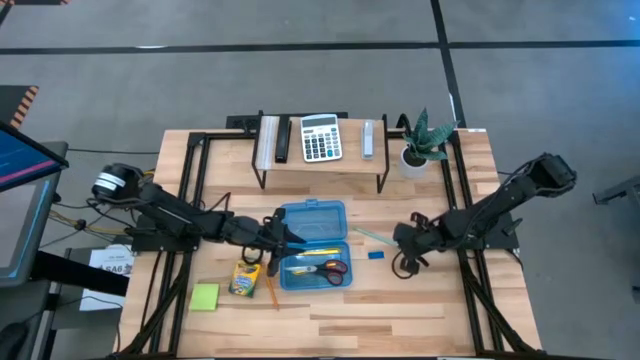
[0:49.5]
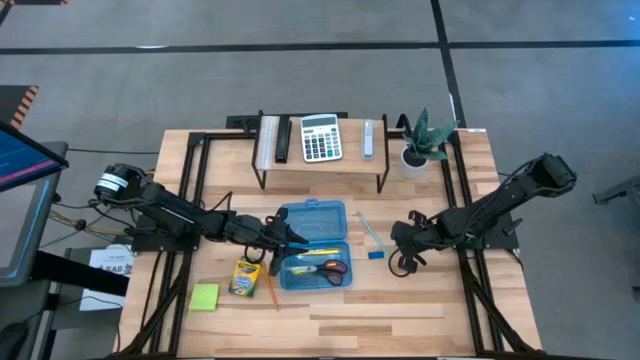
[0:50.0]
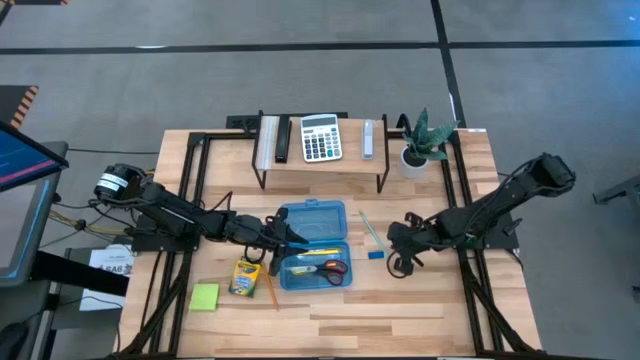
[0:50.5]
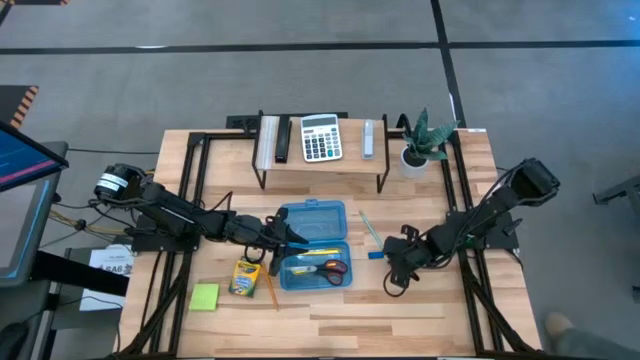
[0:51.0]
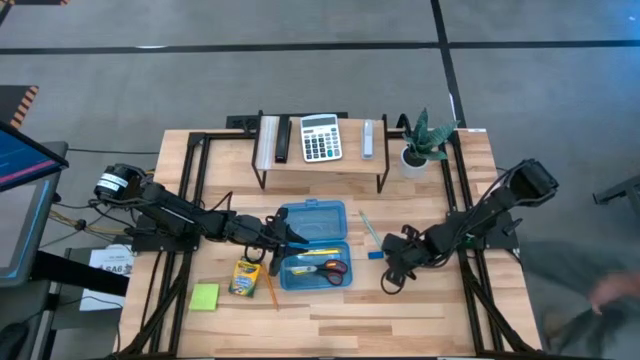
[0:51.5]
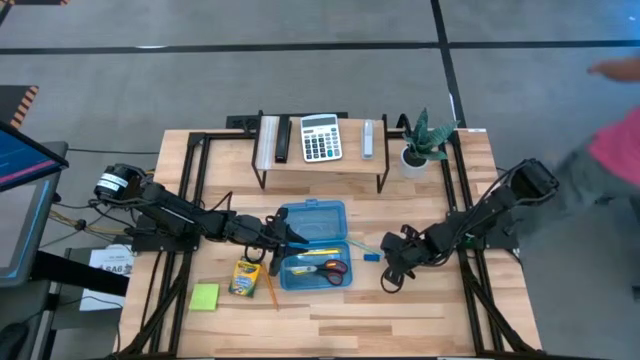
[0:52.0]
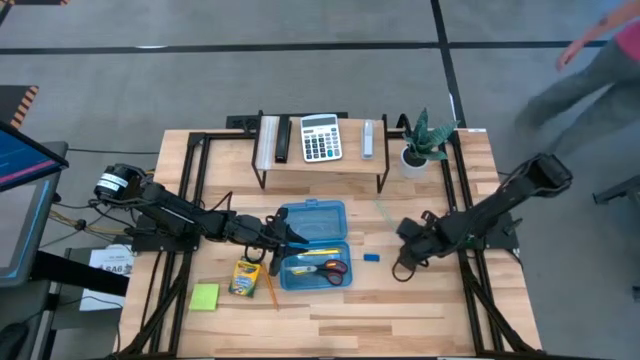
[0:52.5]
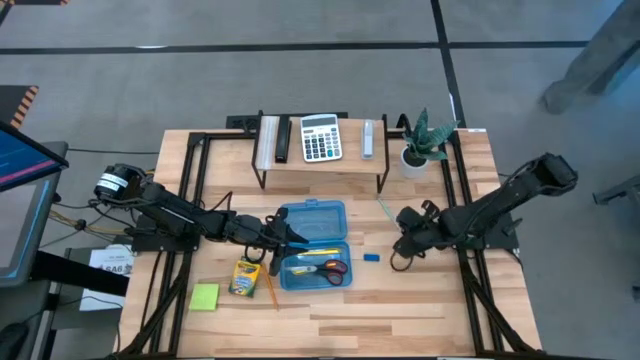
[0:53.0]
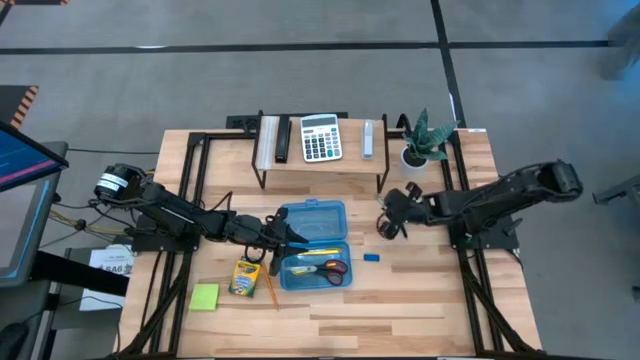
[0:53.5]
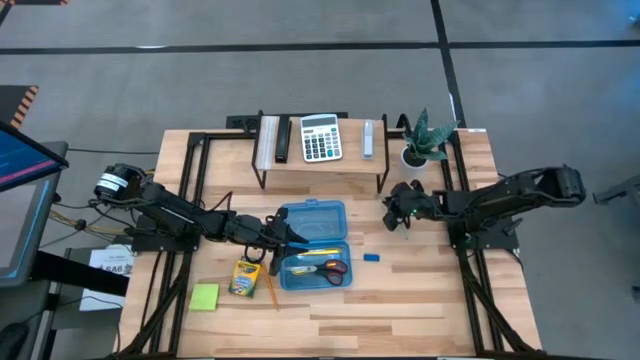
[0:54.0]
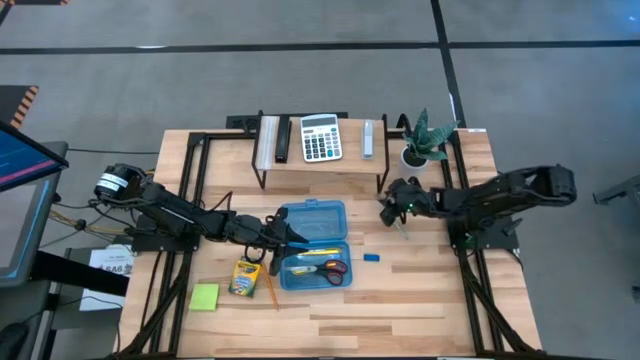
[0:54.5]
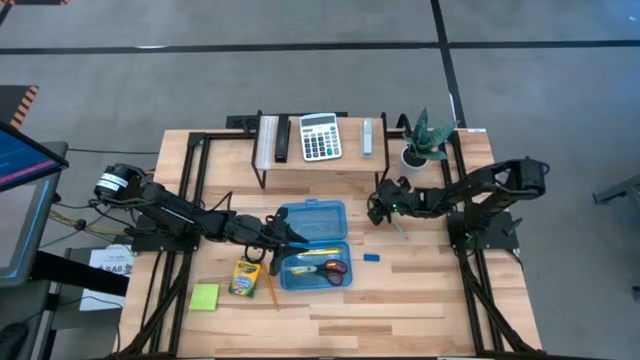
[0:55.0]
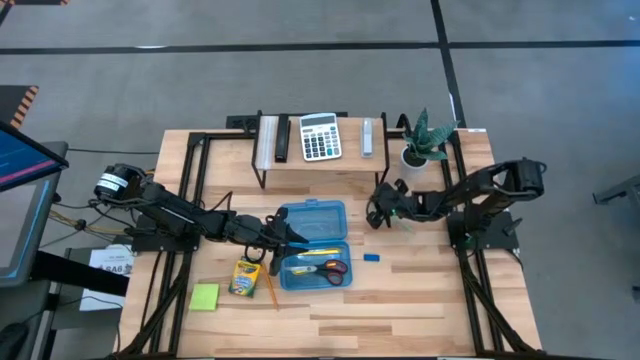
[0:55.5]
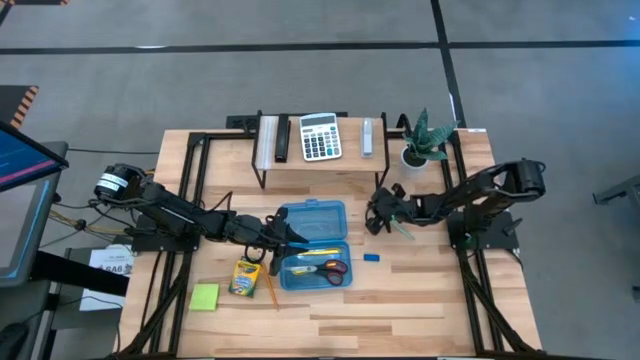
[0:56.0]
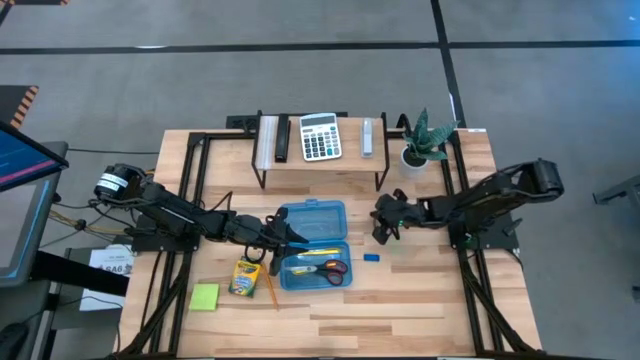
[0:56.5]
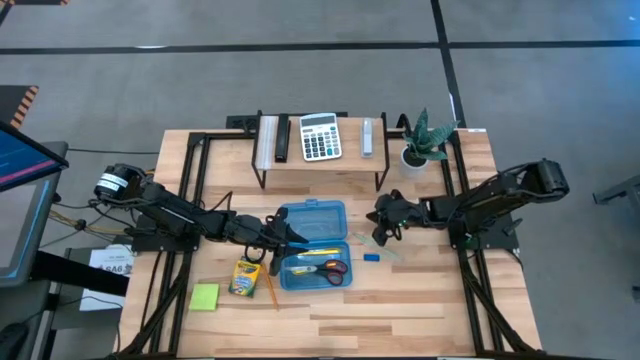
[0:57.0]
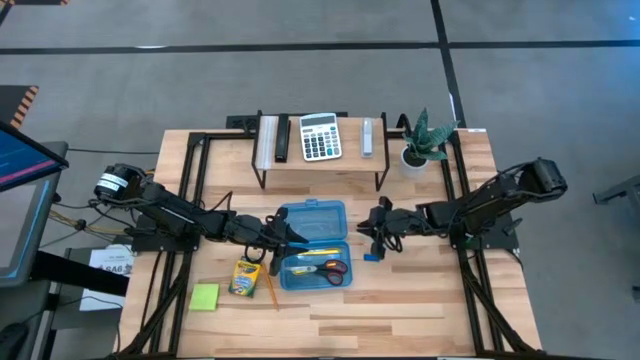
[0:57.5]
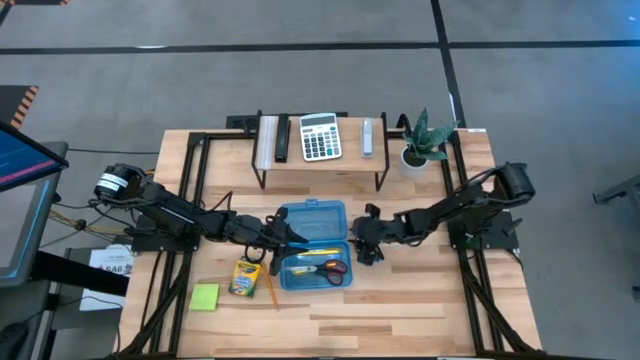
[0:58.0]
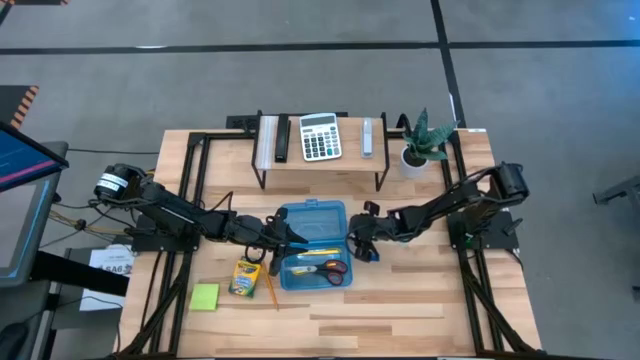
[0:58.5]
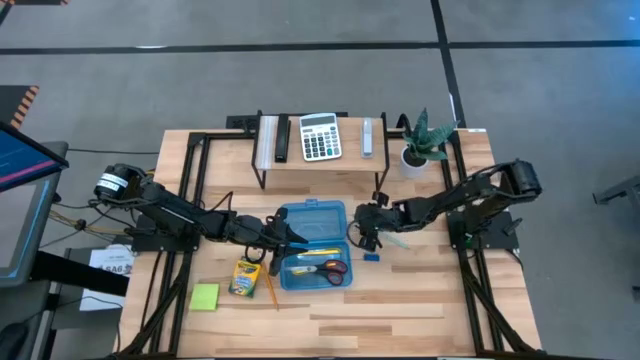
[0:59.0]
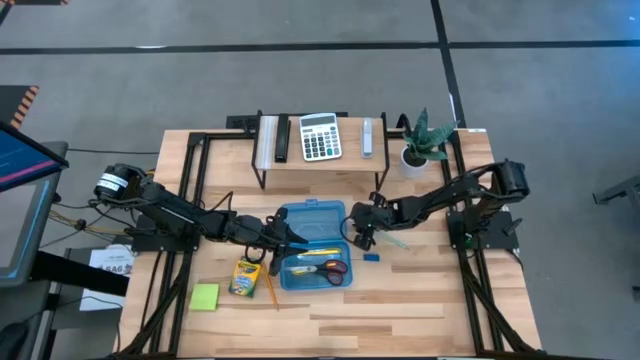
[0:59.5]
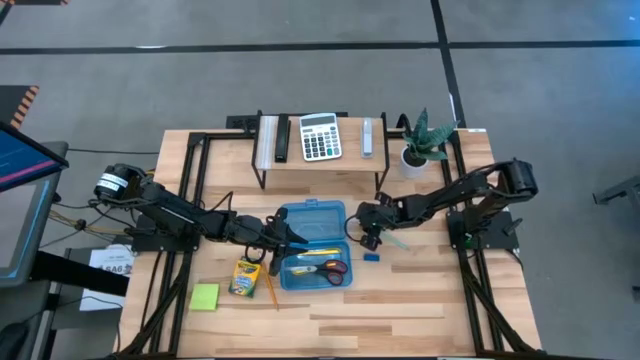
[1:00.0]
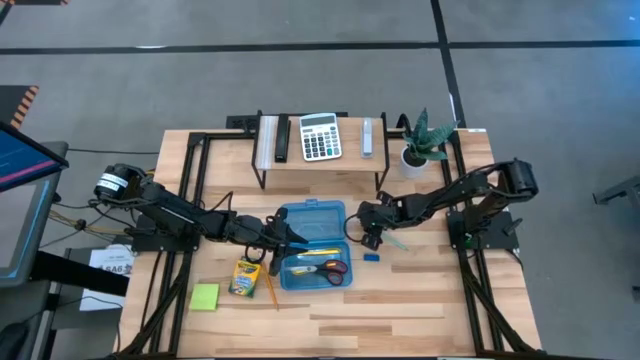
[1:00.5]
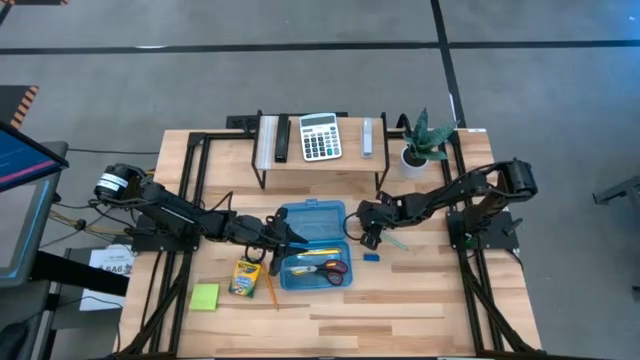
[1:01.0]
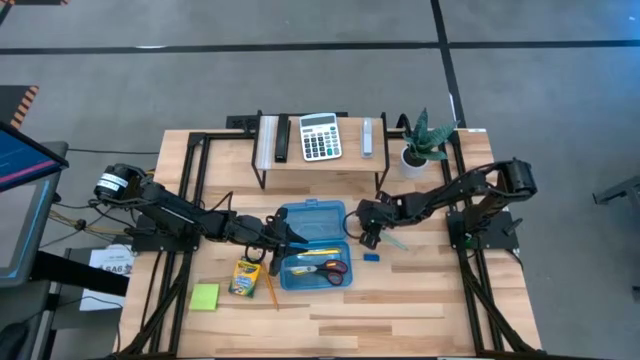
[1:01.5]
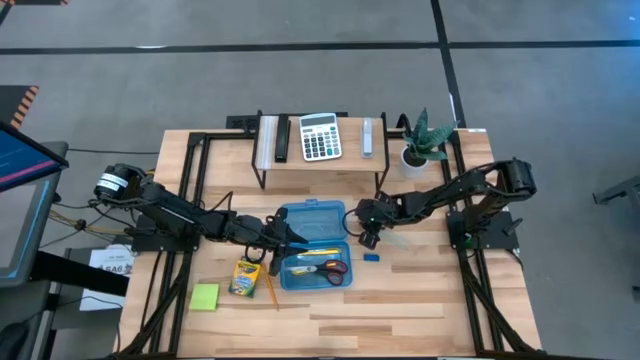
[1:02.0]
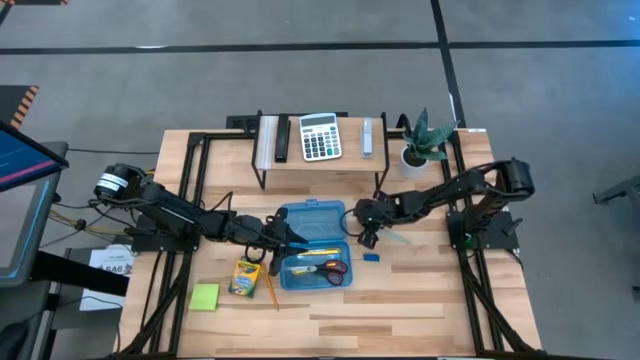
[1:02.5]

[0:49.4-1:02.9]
Task: Pack school essentials
Put the blue pencil into the supply box

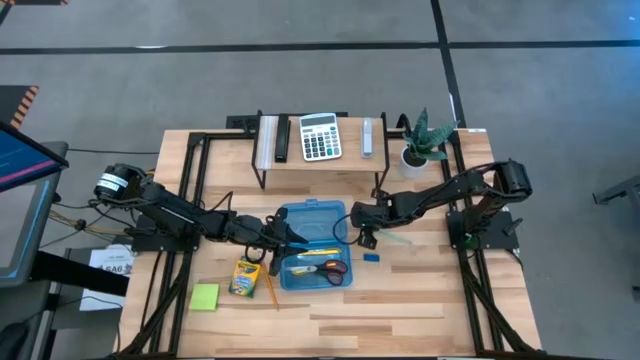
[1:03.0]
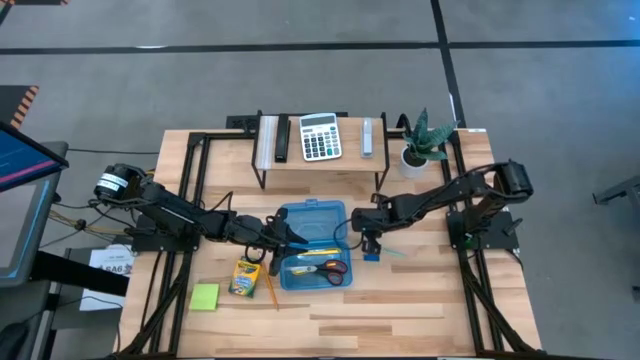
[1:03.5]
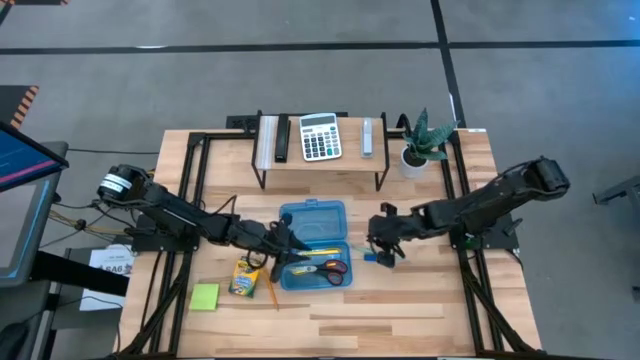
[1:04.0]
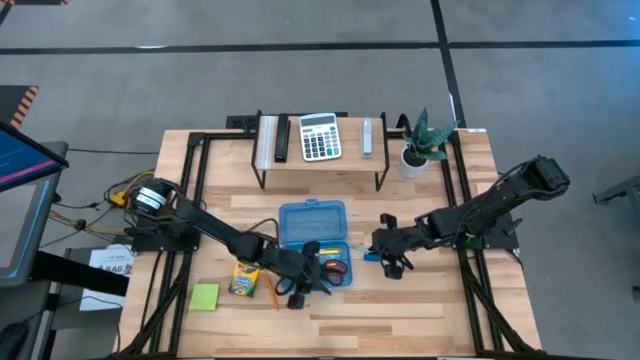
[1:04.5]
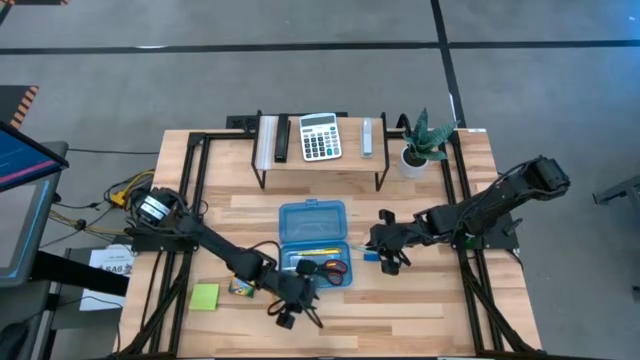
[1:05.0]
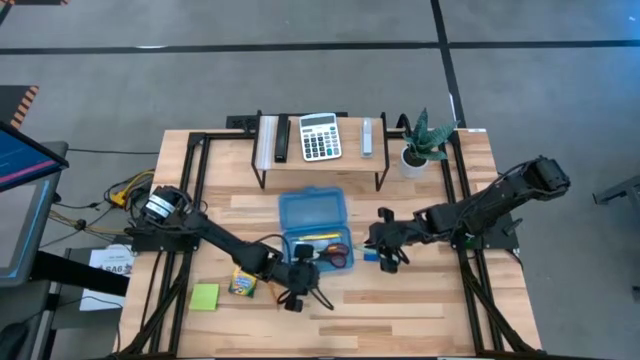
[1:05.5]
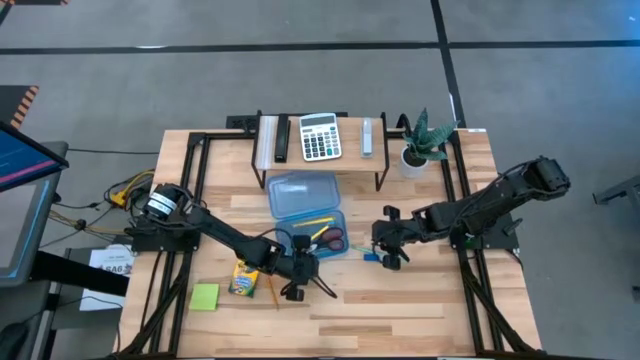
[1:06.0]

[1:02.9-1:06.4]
Adjust the blue supply box on the table

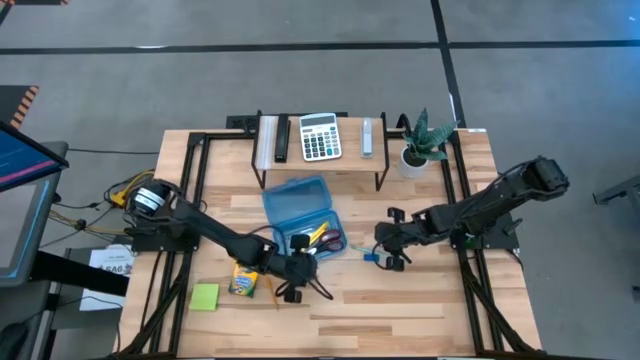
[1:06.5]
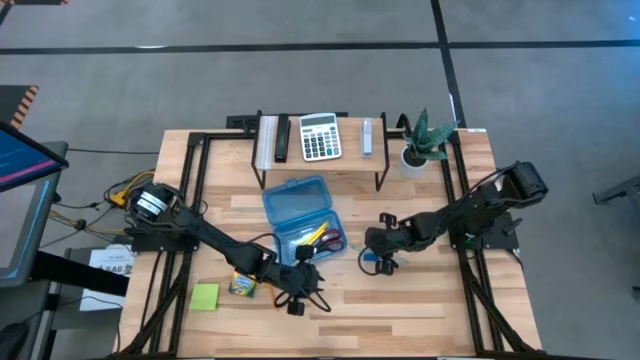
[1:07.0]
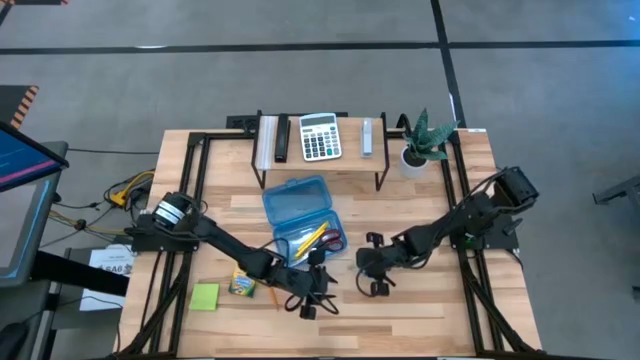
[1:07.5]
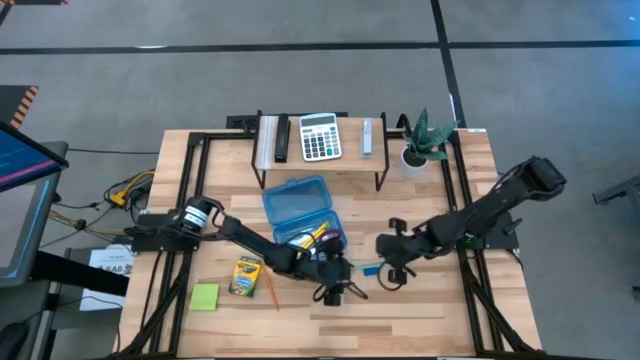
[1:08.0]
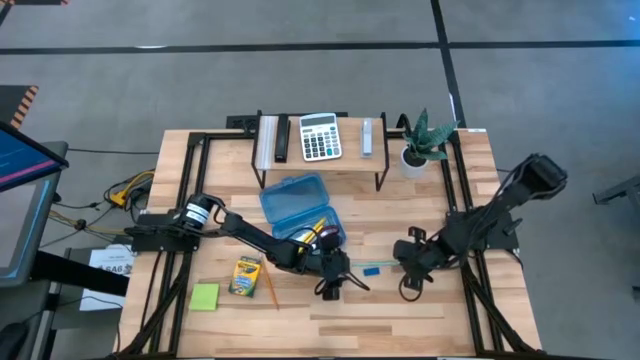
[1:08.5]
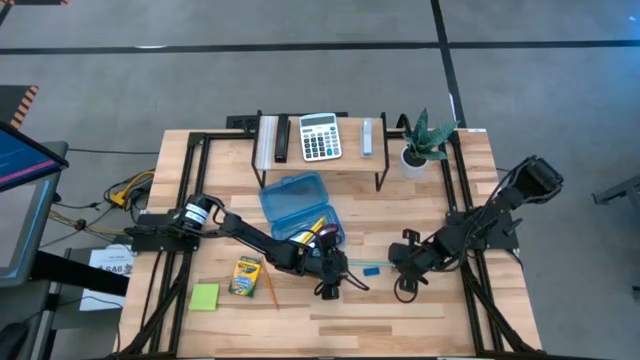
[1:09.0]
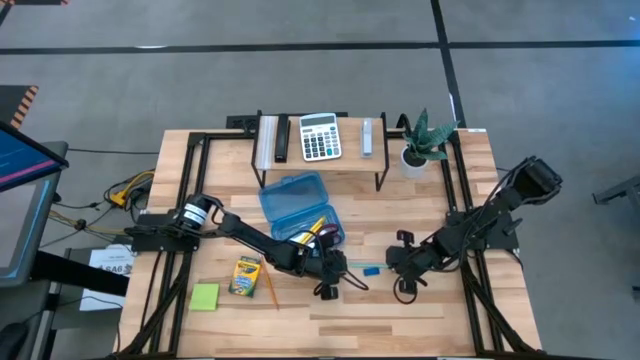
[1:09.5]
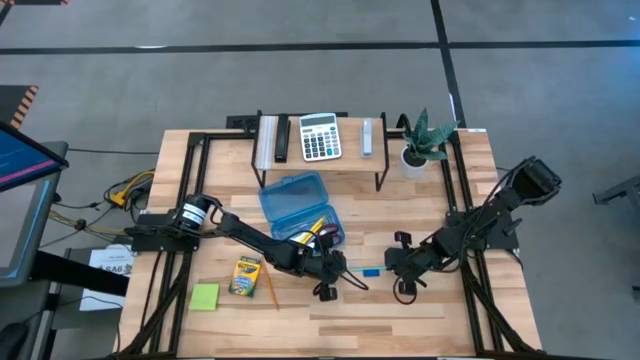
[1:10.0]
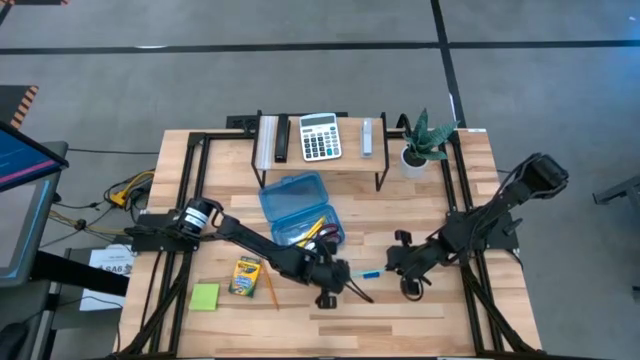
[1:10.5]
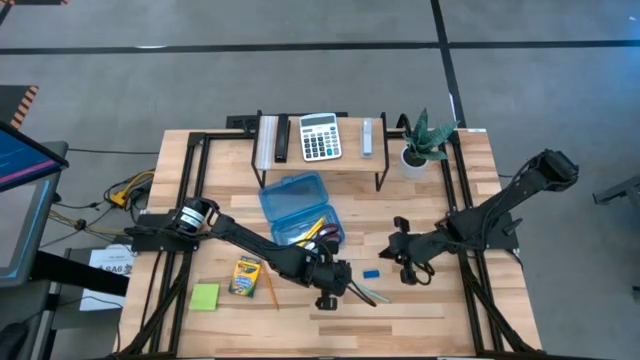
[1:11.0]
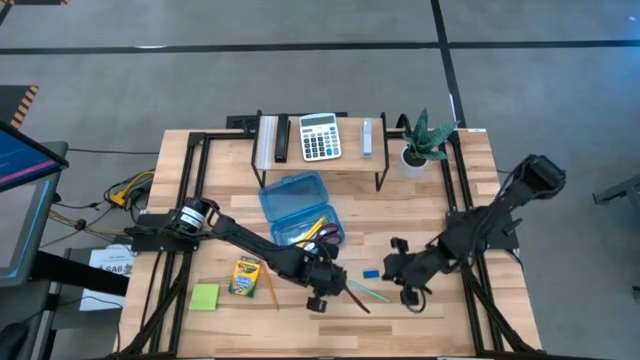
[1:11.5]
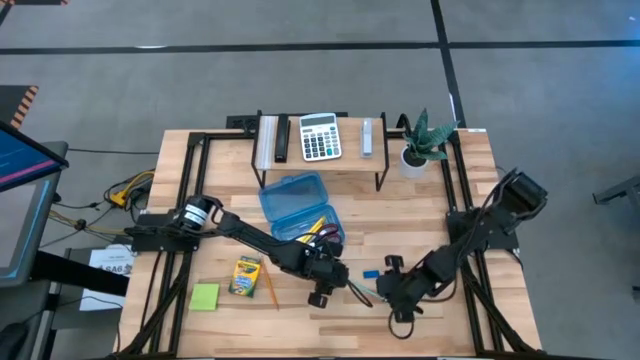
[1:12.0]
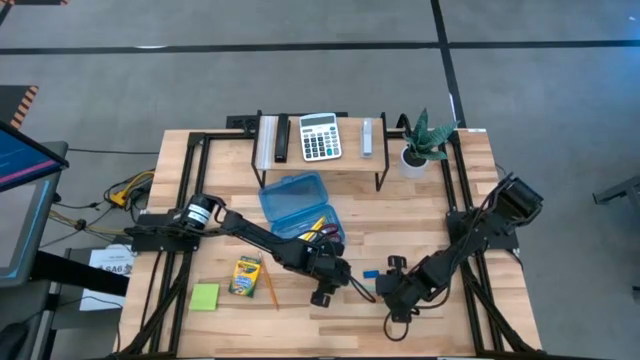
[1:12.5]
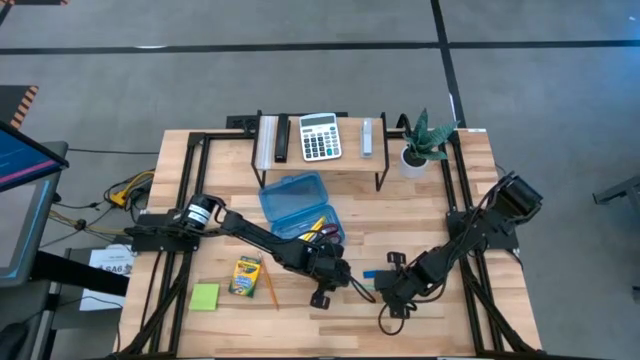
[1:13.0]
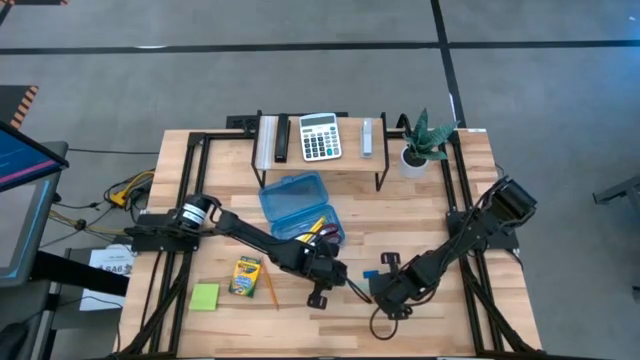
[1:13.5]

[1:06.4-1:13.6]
Put the blue pencil into the supply box
